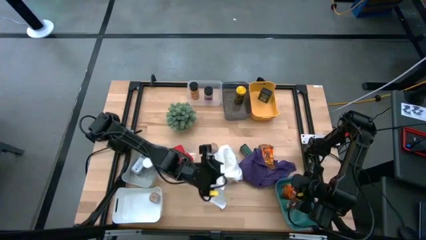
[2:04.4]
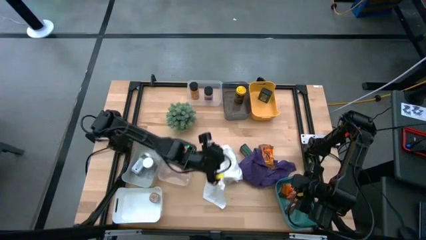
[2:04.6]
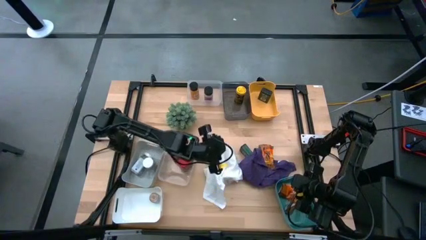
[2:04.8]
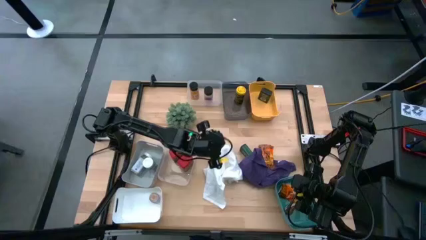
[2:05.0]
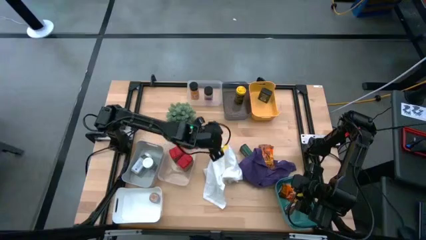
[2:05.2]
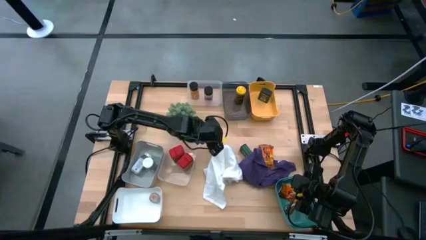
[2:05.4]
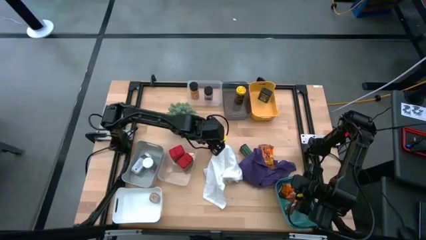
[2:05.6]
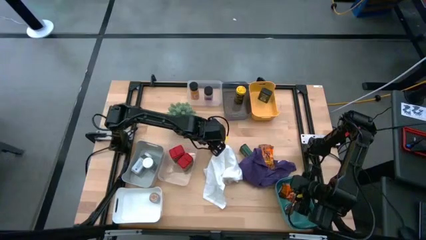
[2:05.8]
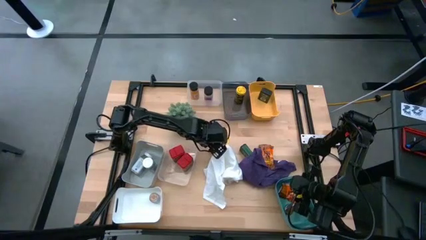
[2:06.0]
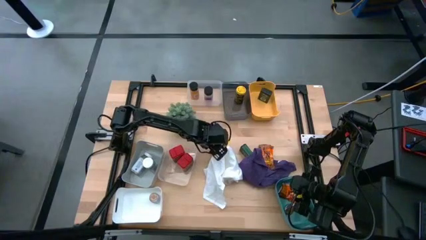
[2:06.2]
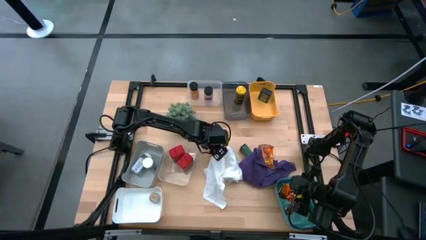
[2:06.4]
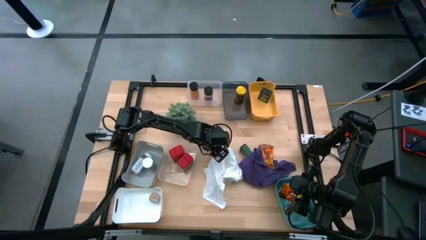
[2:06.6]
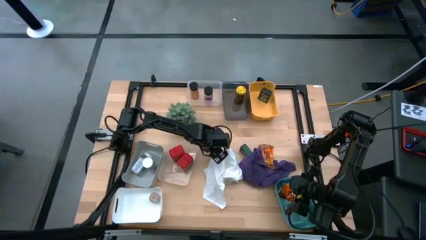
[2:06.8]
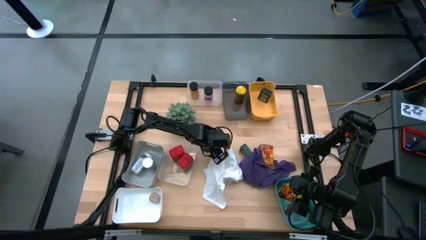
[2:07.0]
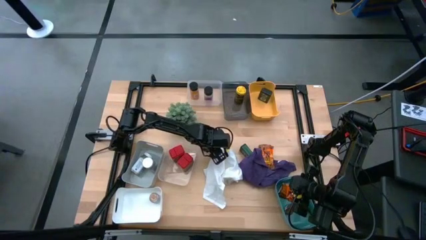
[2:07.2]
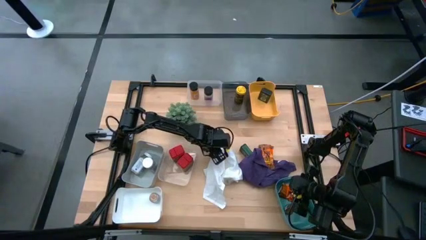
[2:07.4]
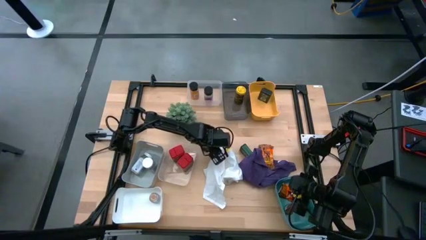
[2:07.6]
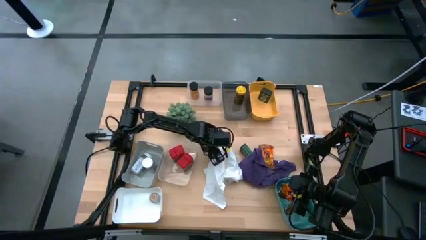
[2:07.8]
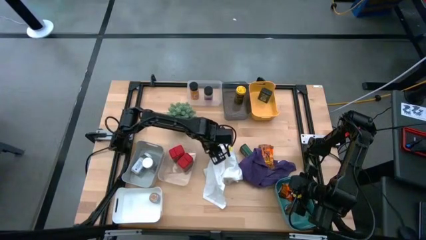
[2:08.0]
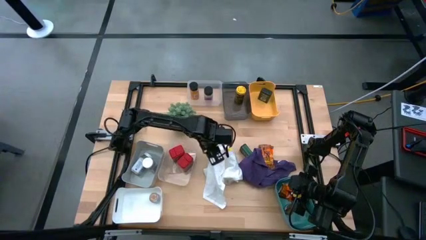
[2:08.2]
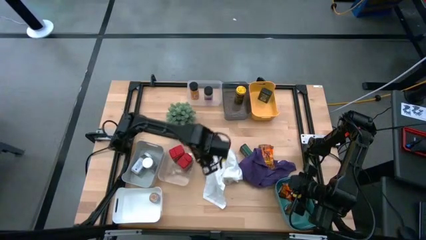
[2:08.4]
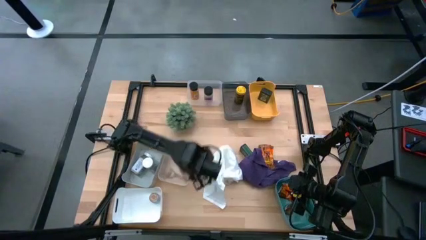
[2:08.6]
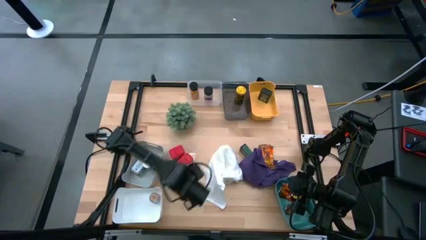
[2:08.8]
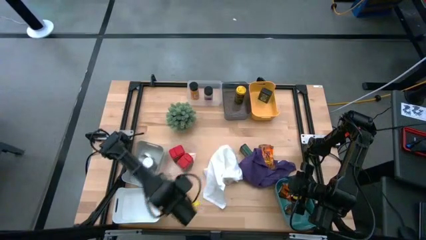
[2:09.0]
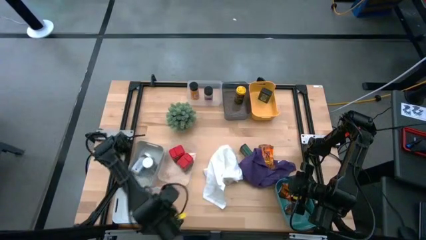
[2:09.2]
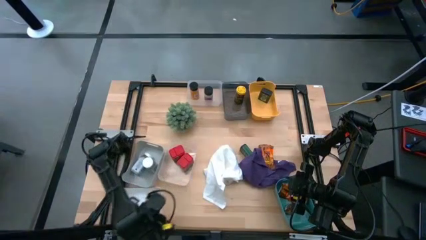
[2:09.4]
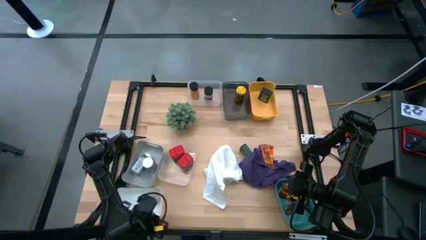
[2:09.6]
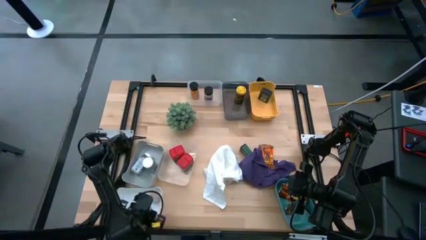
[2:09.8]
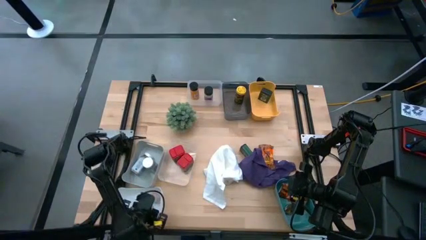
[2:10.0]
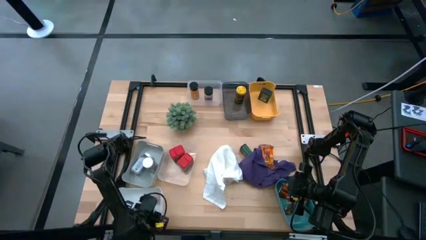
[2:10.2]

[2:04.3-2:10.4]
Task: Sort spices by type
Put the brown seasoning bottle into the white bin

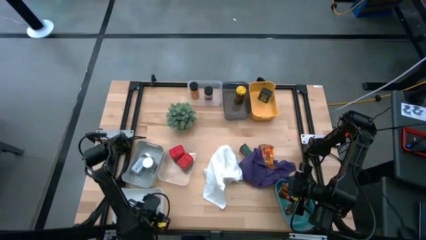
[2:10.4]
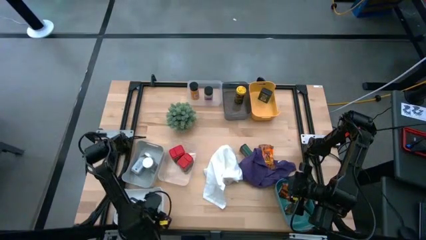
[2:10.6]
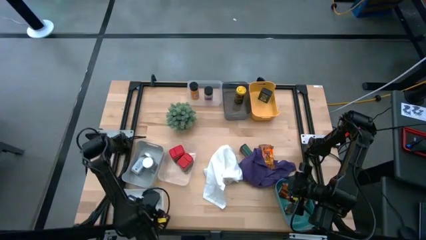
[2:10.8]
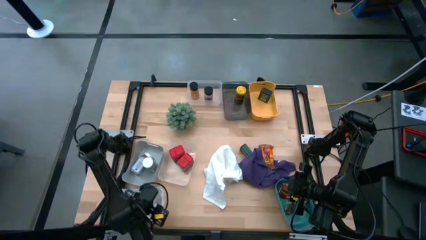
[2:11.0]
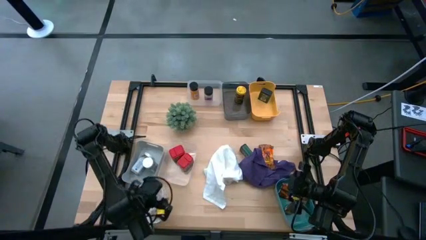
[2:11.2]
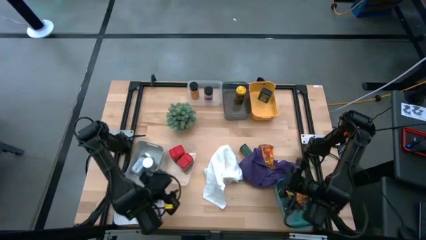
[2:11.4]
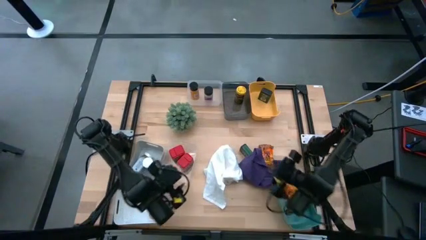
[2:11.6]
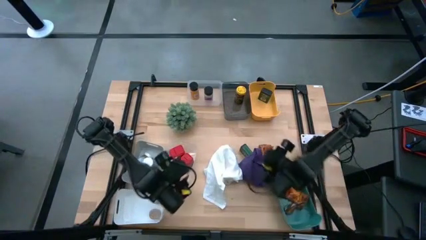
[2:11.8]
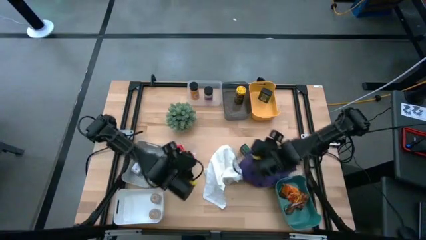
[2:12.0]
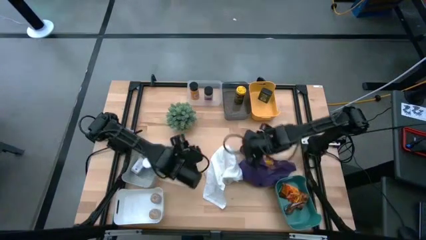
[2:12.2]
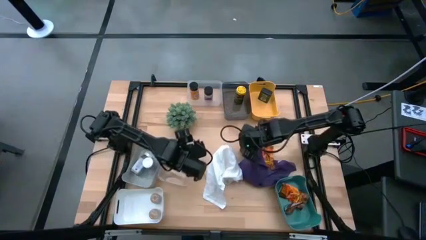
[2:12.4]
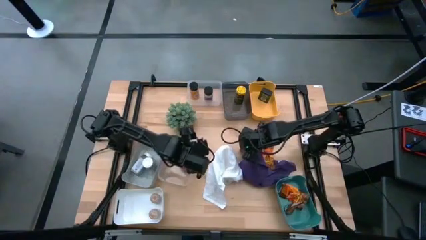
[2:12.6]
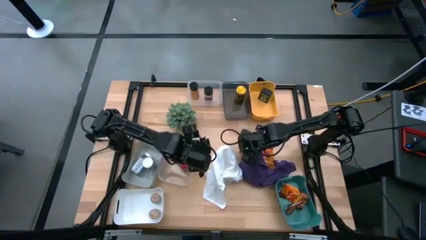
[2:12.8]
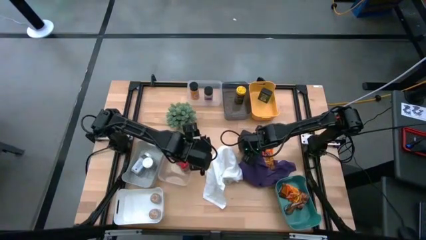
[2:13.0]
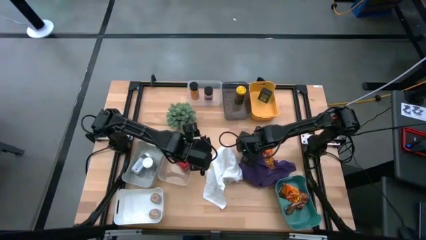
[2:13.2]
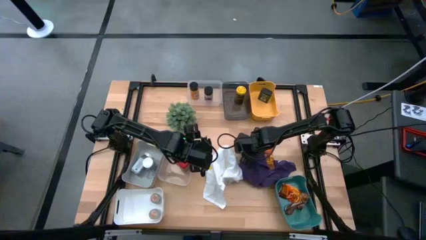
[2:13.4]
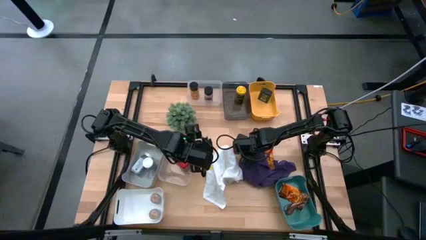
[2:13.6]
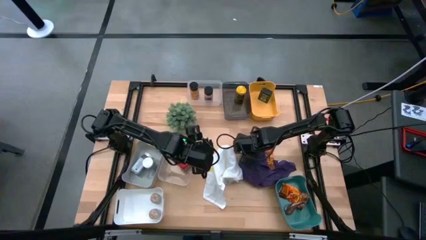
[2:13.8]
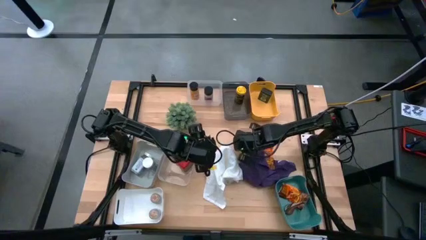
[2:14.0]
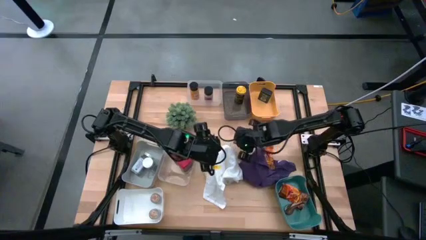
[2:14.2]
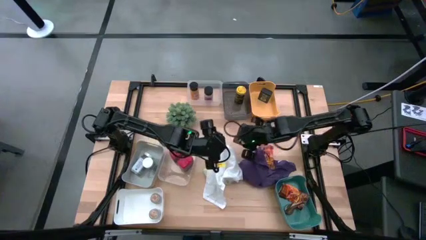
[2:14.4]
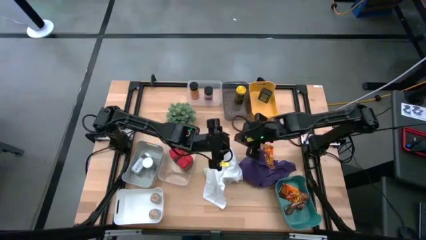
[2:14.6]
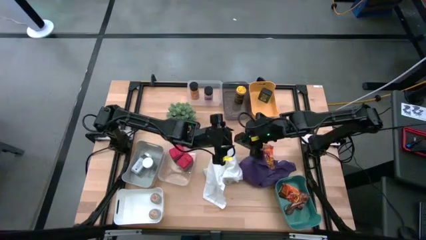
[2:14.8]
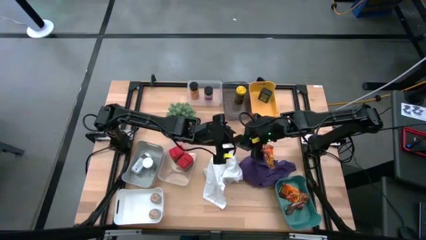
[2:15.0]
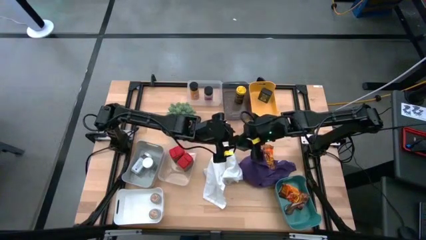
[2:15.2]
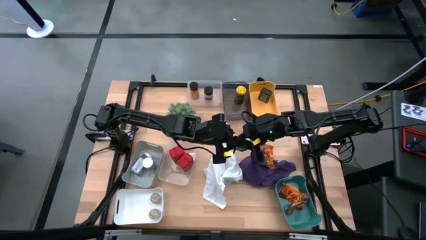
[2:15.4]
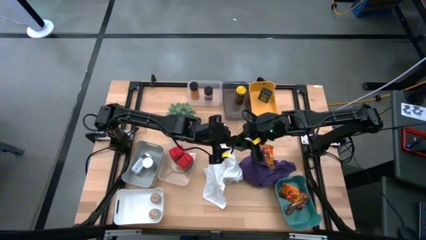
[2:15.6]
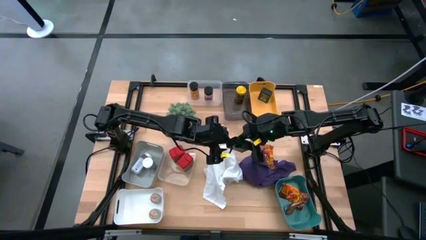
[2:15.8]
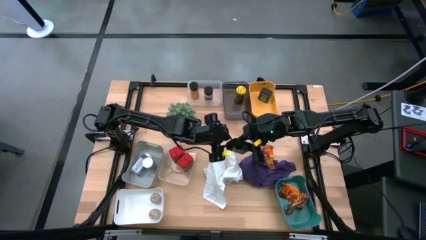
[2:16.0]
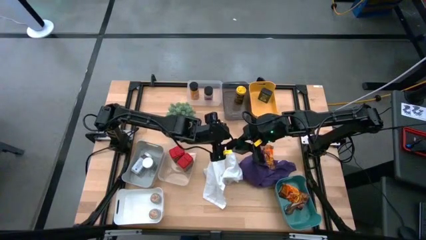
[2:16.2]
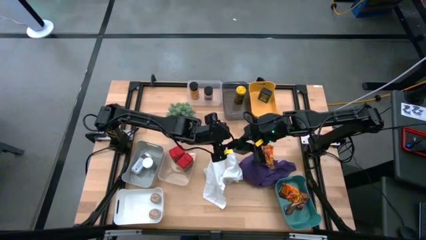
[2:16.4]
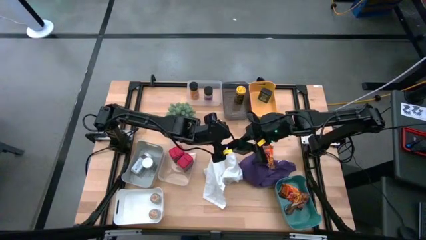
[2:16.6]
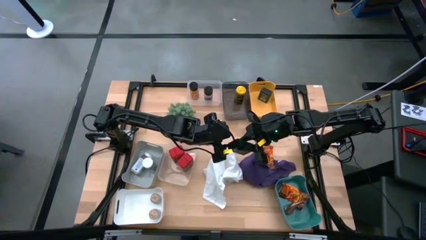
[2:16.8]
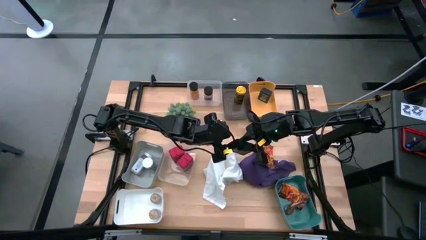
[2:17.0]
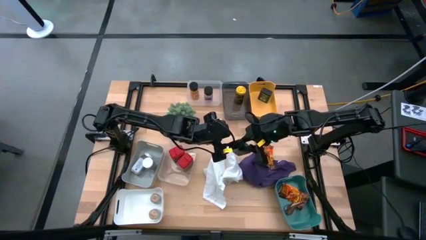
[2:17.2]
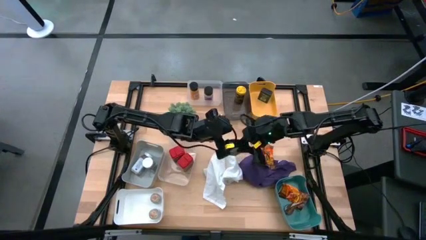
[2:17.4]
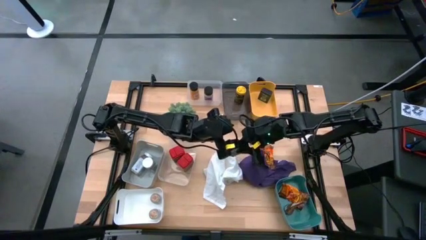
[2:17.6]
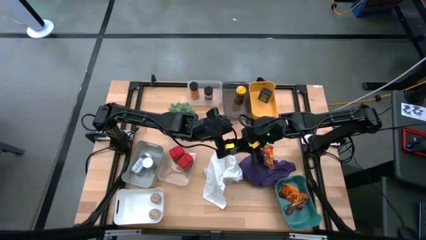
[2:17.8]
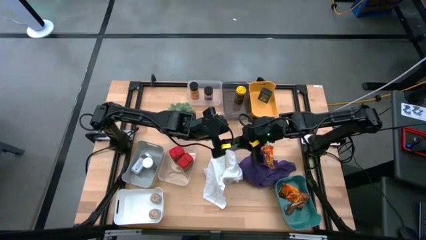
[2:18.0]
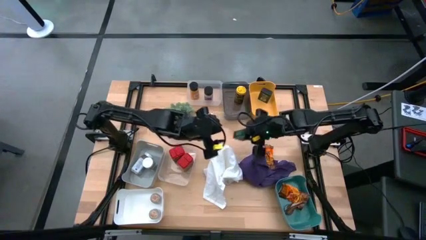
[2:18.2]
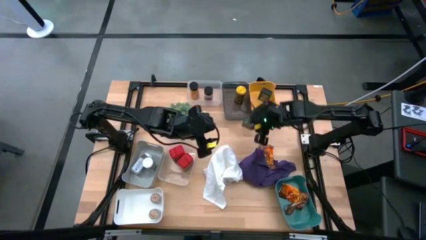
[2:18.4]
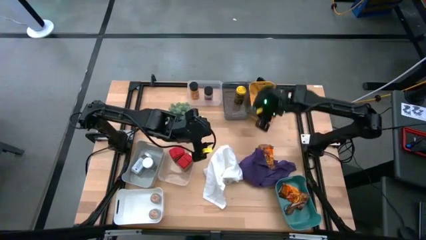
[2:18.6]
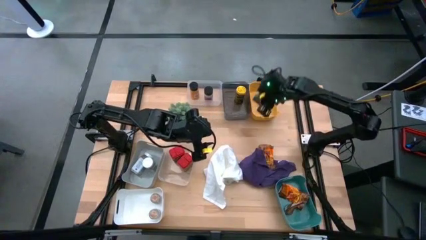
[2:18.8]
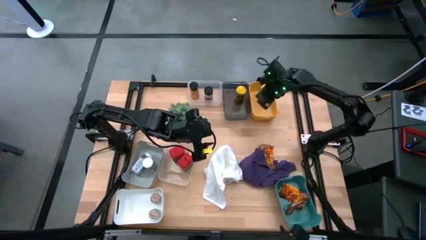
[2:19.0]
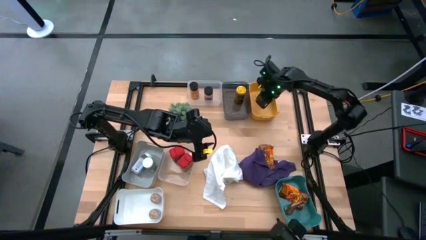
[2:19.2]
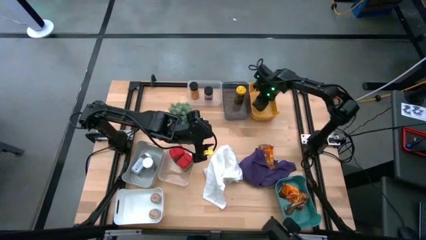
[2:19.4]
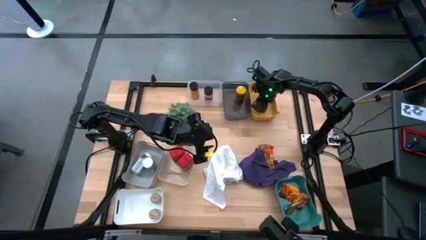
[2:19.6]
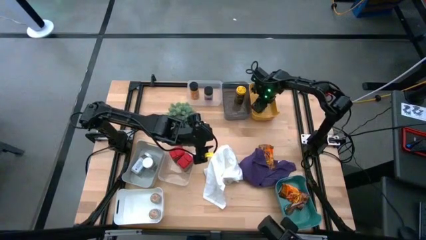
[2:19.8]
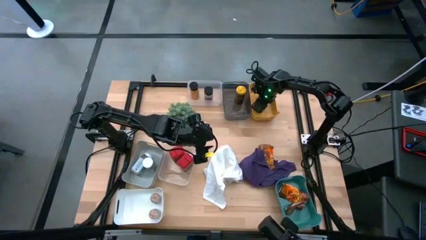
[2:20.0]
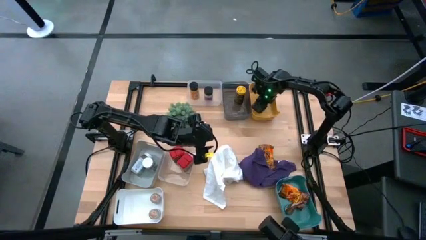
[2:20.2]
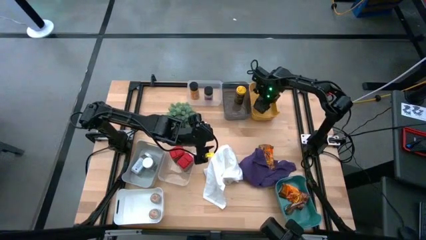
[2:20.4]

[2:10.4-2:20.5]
Put the black seasoning can into the yellow bin
